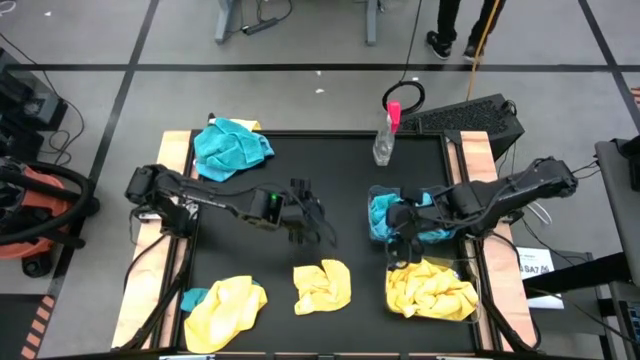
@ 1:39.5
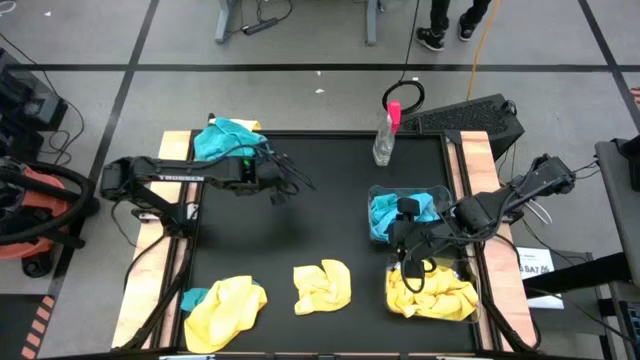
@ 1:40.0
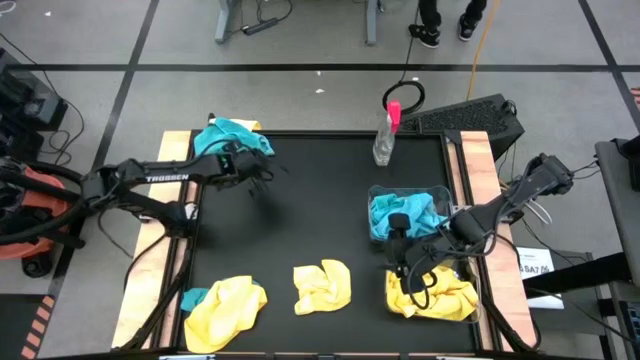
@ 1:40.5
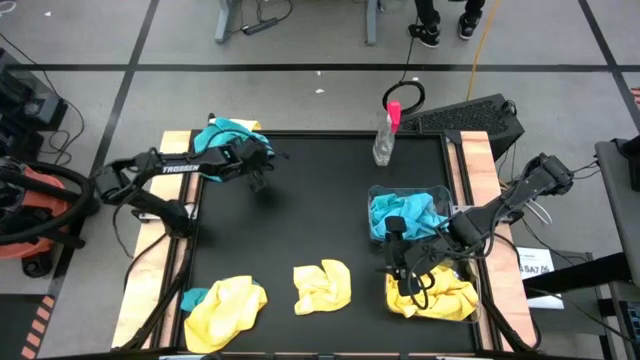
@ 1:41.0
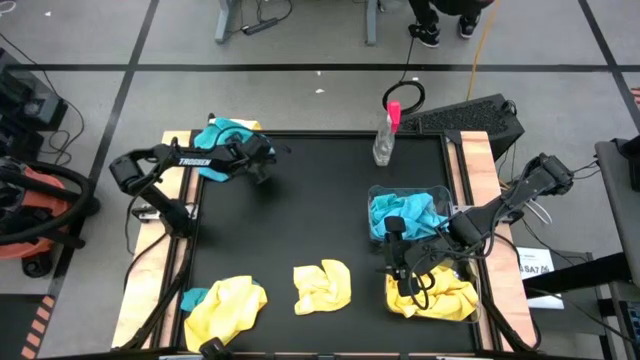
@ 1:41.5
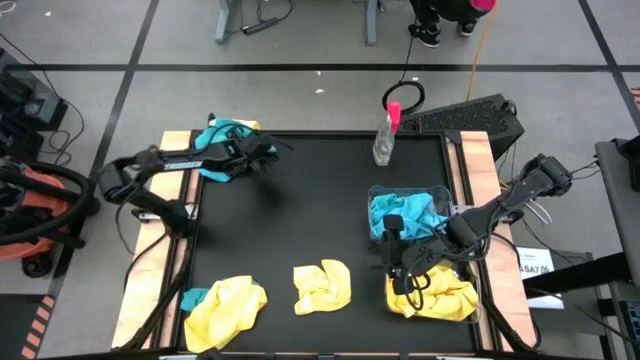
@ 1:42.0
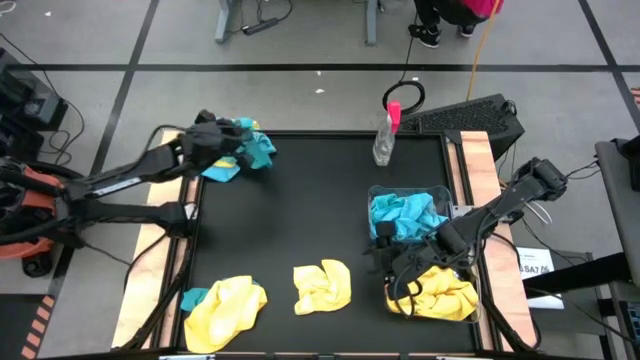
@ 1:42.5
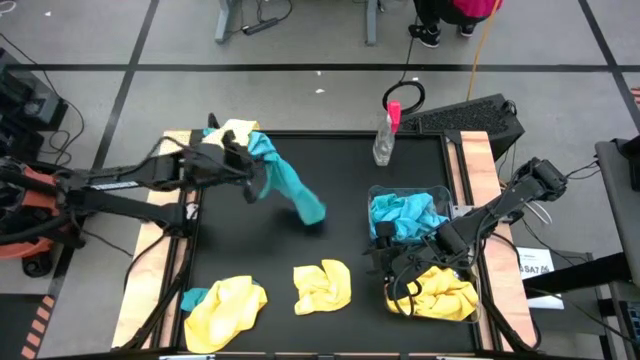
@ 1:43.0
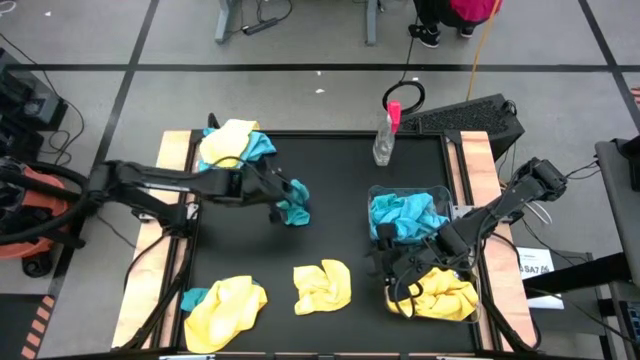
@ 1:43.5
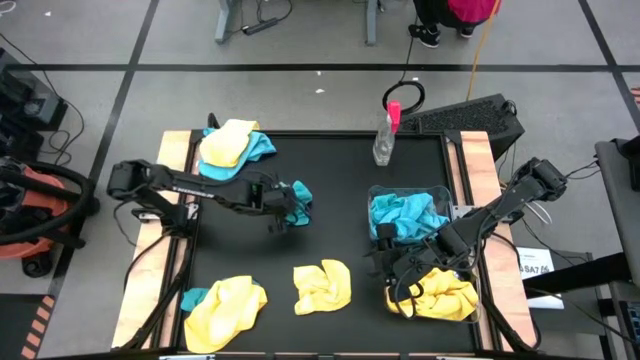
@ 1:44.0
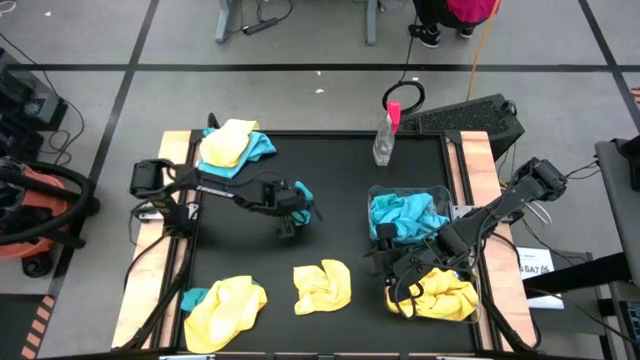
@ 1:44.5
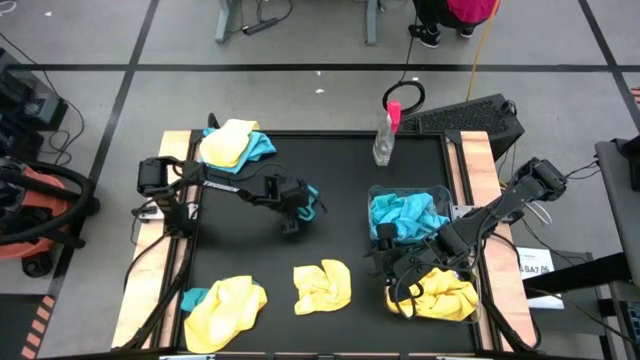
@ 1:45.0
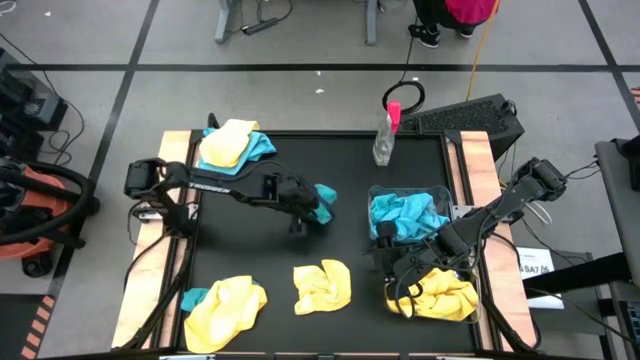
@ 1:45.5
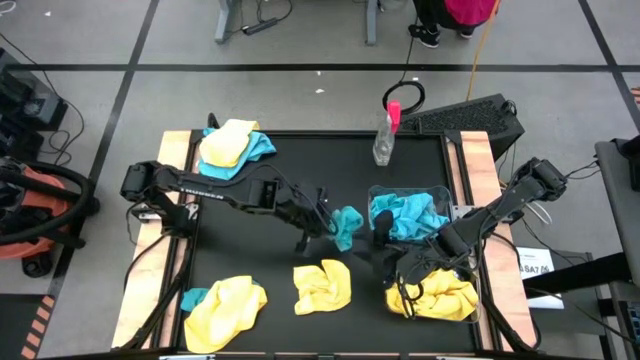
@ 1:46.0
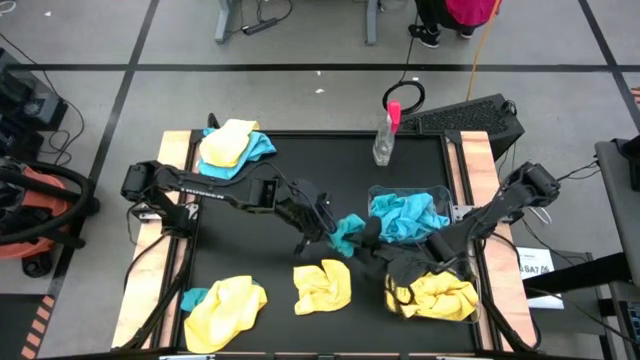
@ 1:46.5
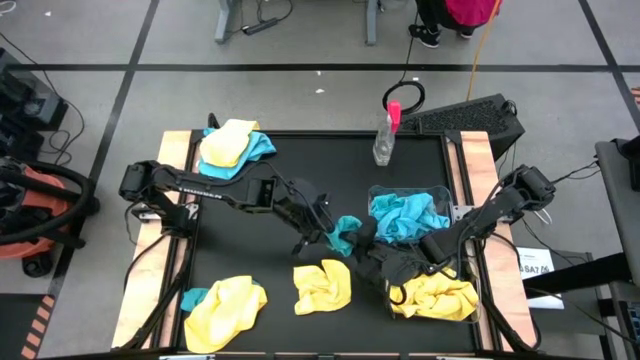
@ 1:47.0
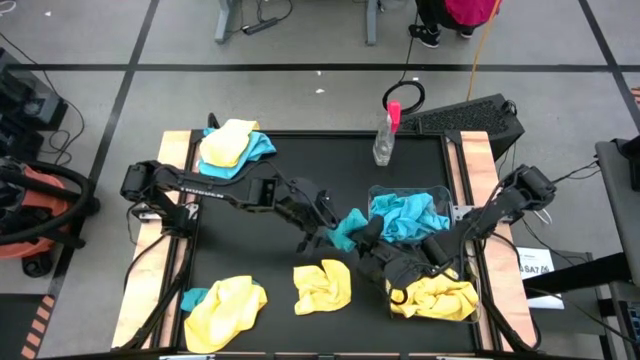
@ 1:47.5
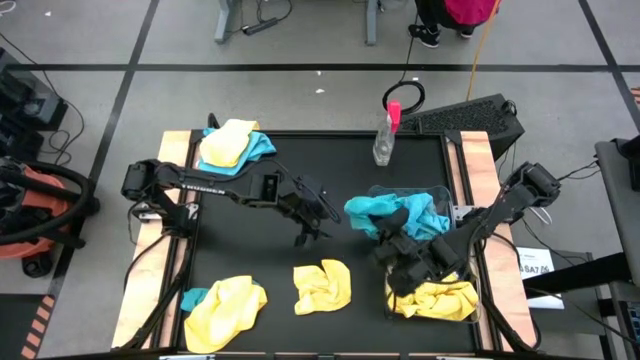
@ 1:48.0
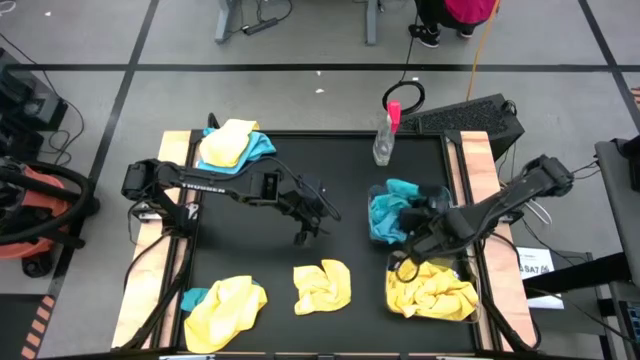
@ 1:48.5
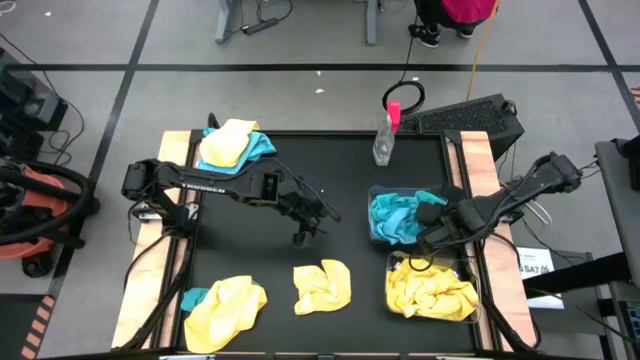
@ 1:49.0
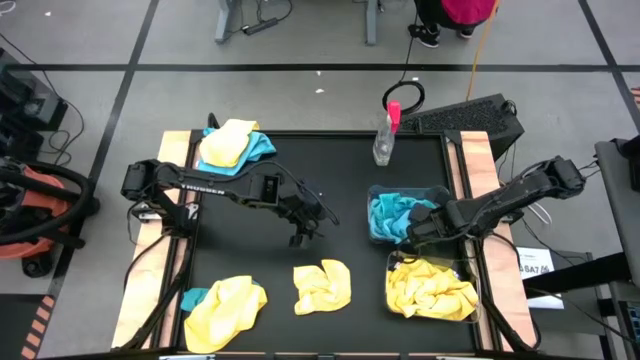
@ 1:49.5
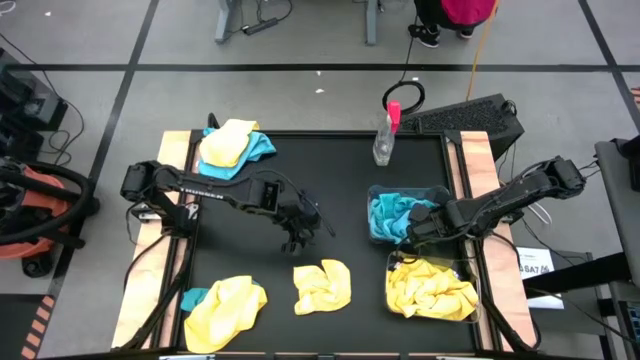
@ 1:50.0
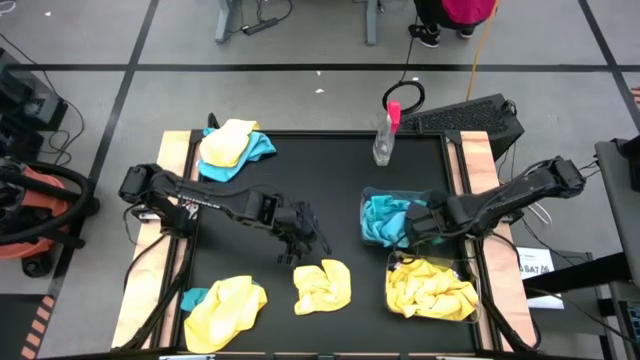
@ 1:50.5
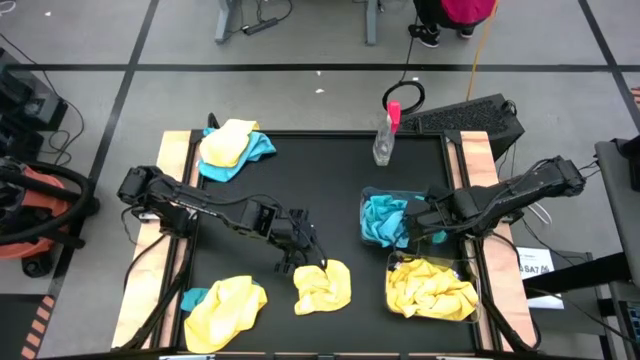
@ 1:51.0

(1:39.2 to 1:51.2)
Task: Sort microfiber towel by color & place in baskets
Put the blue towel into the top transparent bin

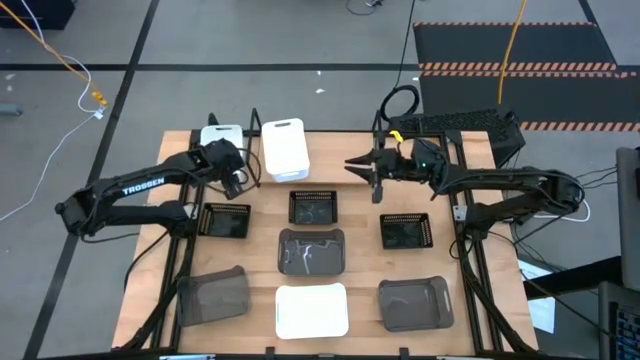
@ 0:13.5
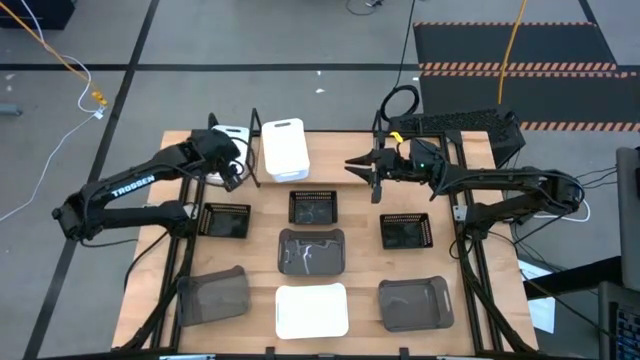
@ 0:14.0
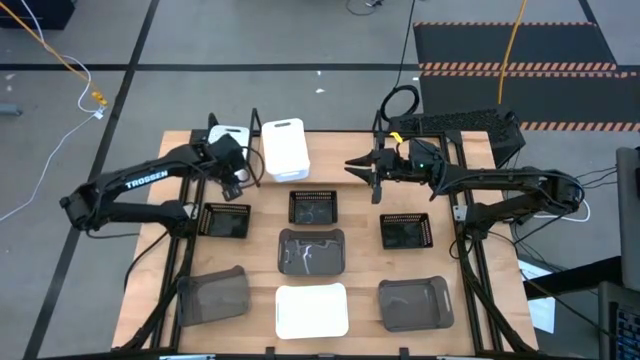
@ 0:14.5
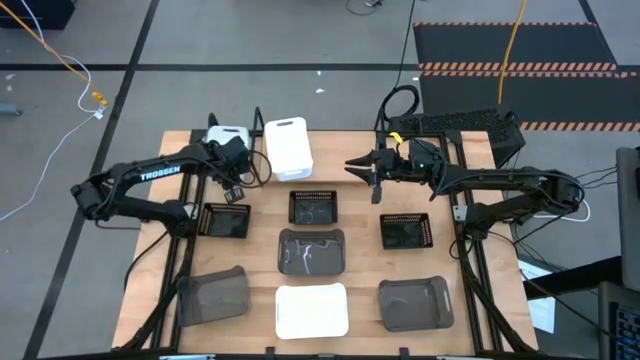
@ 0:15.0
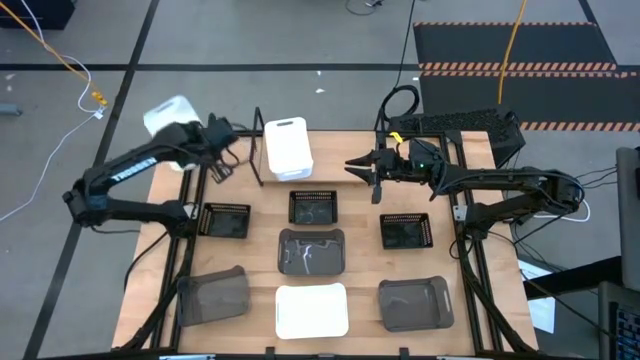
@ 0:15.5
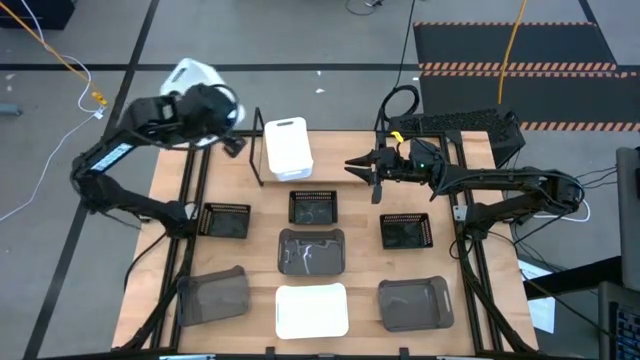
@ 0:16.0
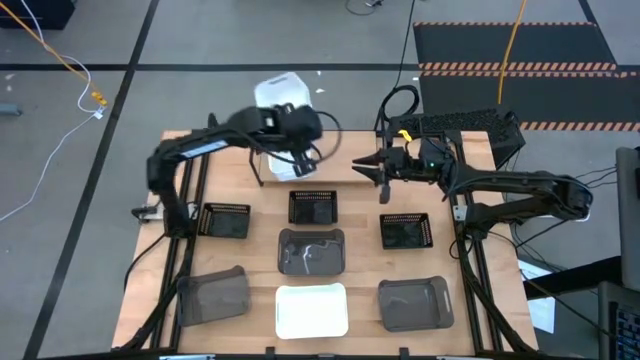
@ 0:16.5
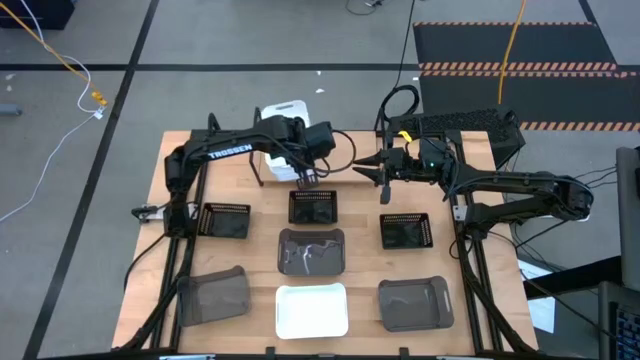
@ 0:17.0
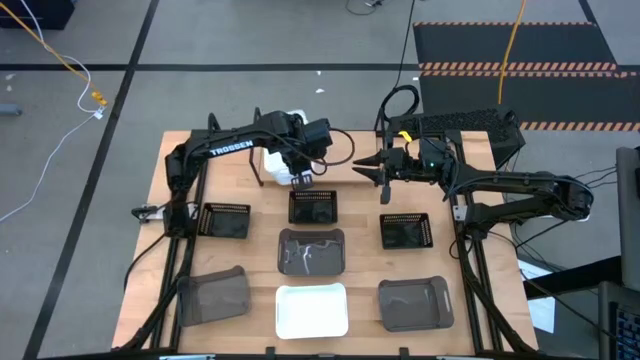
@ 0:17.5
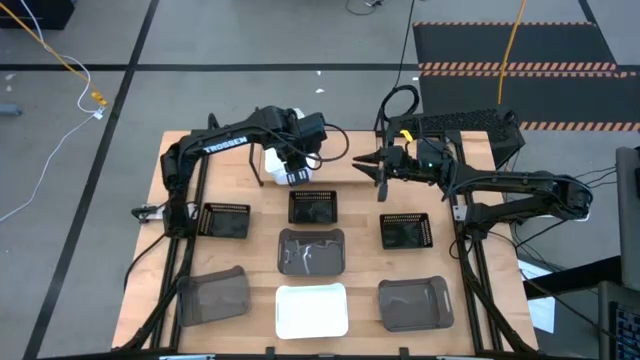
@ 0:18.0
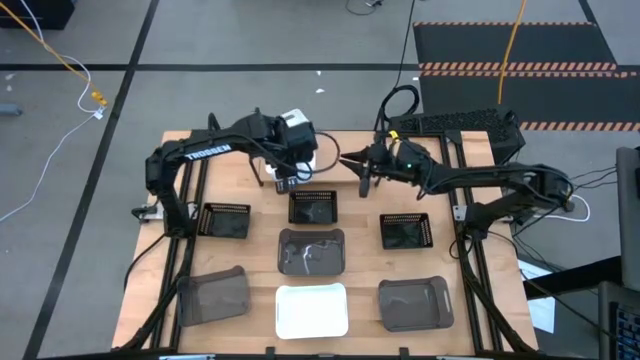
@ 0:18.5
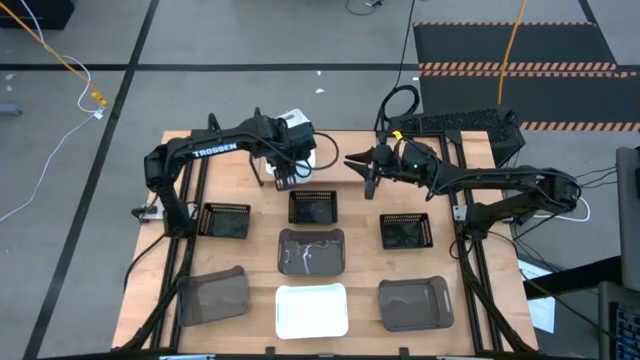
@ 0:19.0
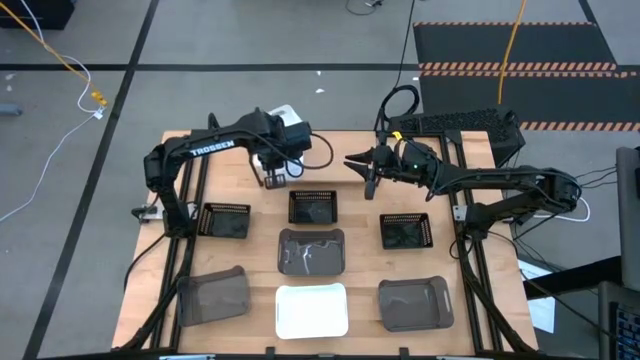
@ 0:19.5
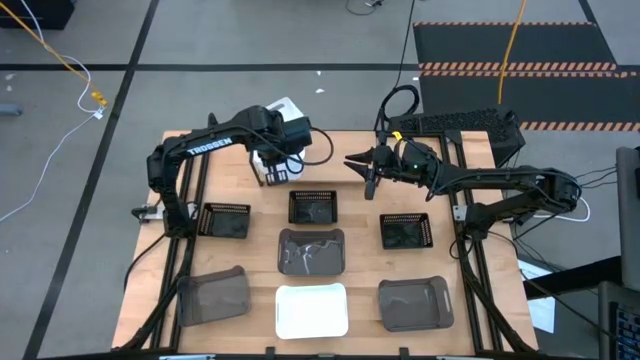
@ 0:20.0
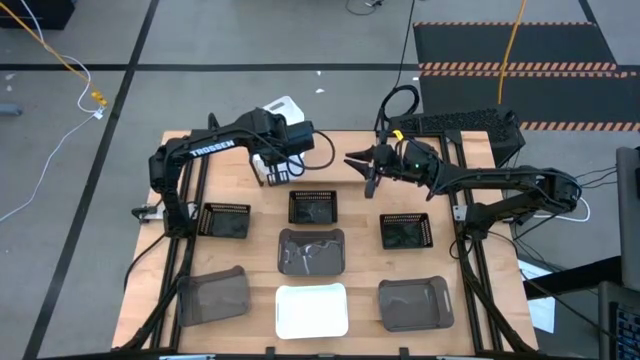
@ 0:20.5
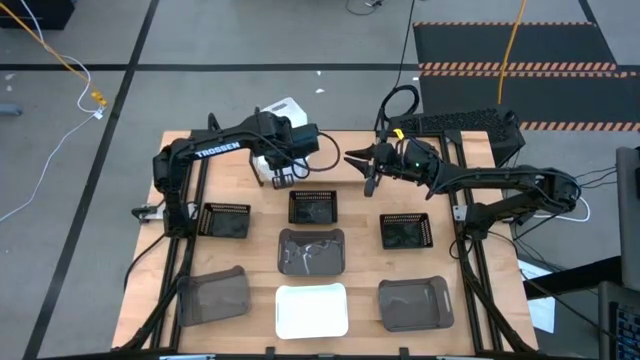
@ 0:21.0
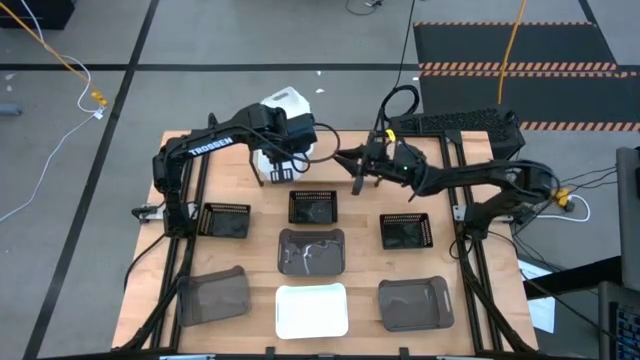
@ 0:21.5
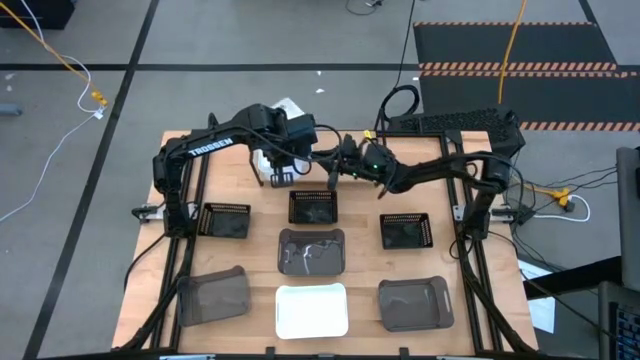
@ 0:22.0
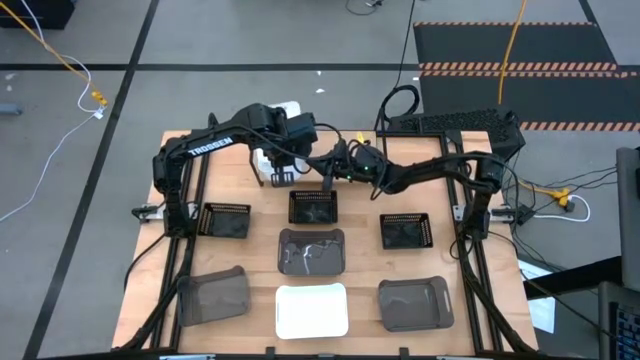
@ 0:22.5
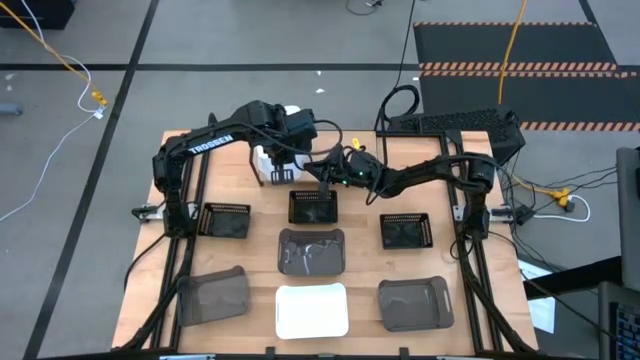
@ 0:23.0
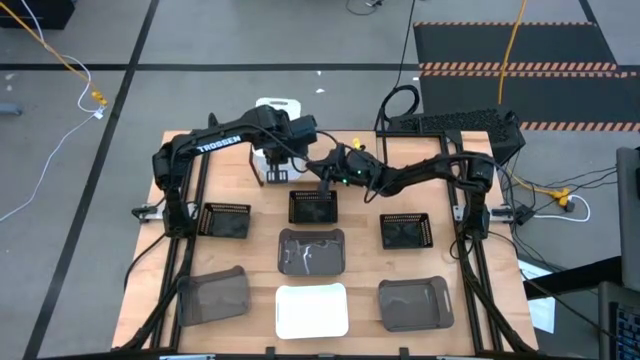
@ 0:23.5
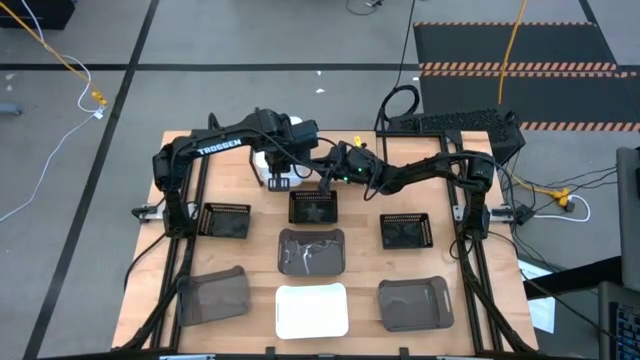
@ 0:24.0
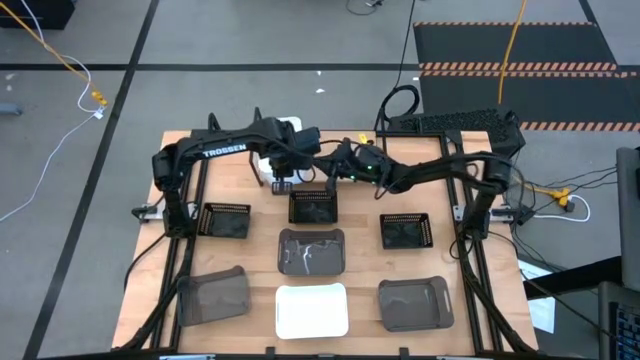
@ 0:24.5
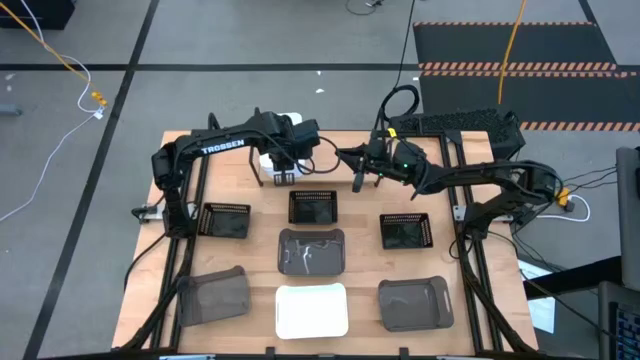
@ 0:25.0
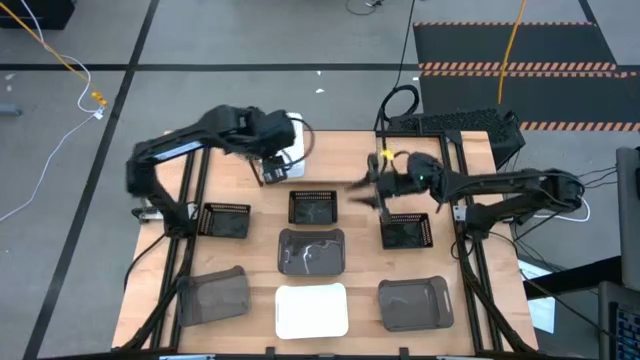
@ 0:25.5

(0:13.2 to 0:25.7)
Task: Stack baskets on shelf by color
Stack the top white on top of the other white bin on the shelf
